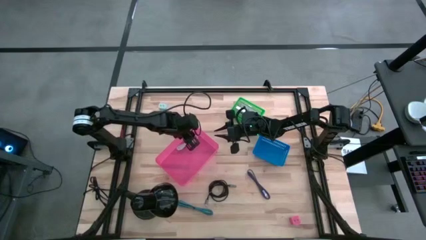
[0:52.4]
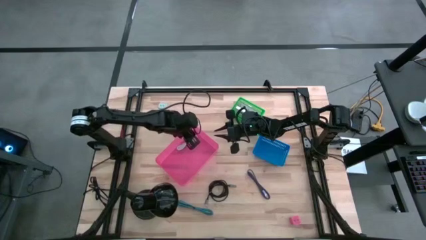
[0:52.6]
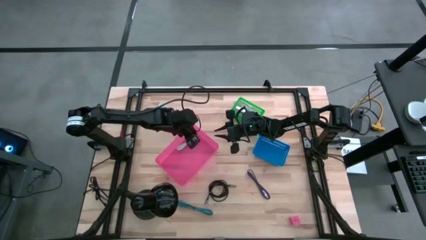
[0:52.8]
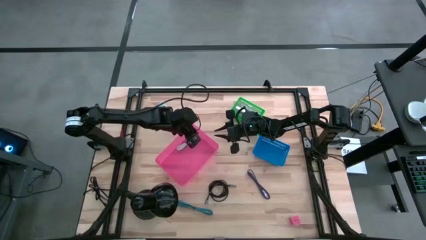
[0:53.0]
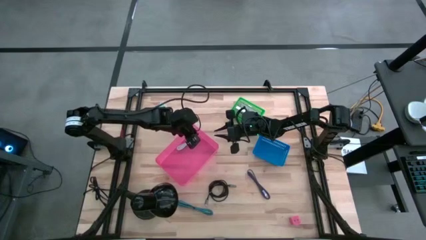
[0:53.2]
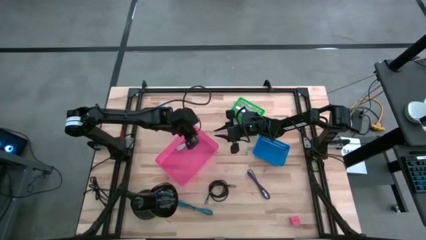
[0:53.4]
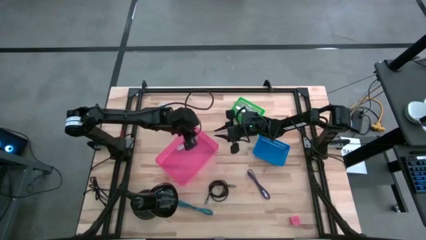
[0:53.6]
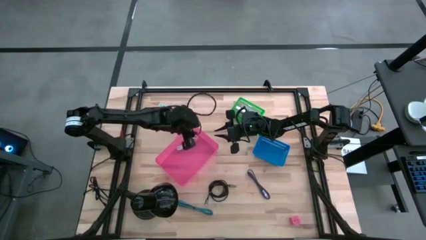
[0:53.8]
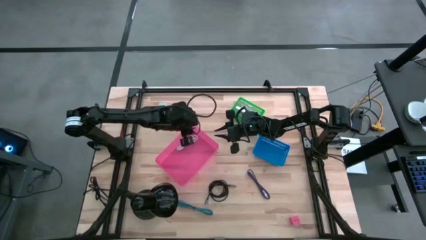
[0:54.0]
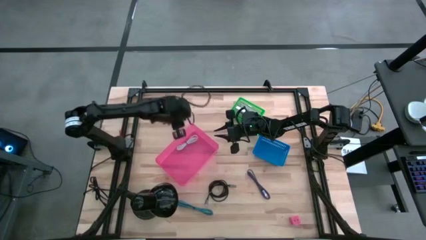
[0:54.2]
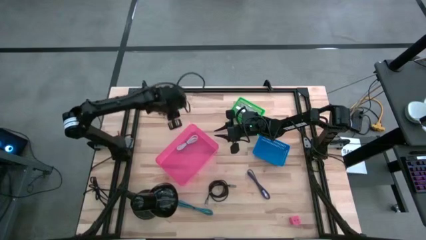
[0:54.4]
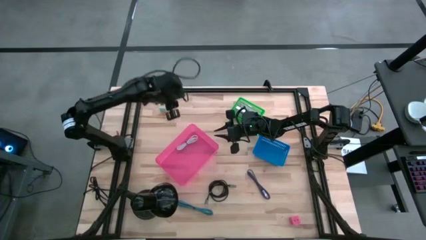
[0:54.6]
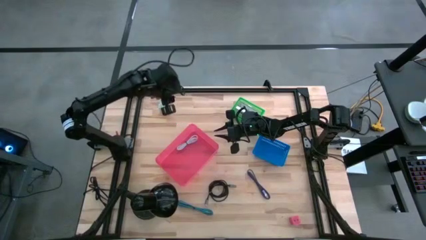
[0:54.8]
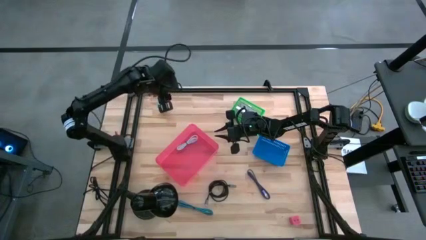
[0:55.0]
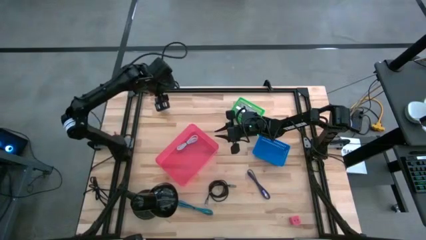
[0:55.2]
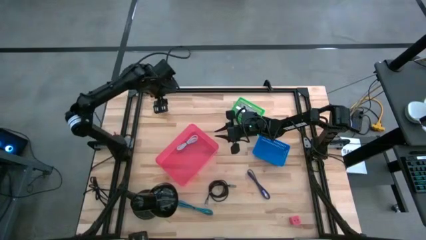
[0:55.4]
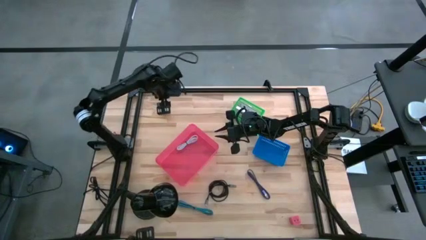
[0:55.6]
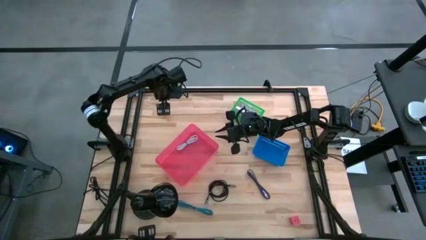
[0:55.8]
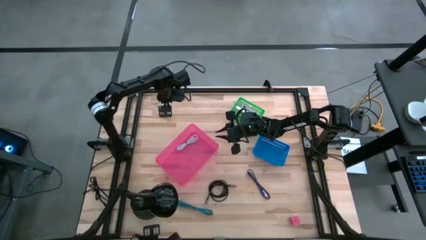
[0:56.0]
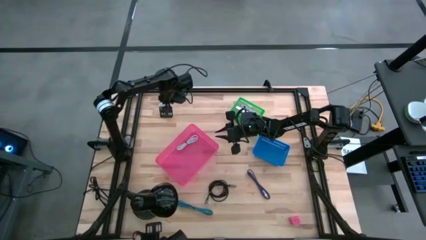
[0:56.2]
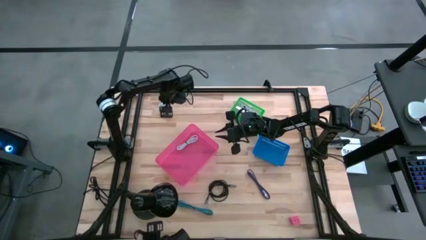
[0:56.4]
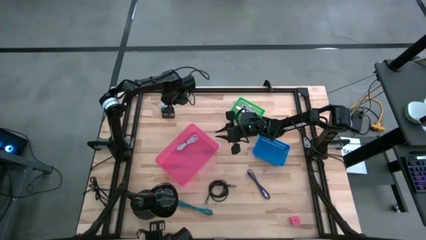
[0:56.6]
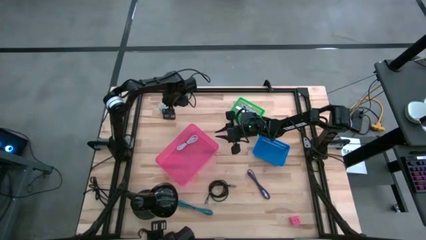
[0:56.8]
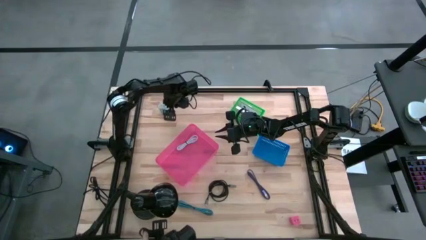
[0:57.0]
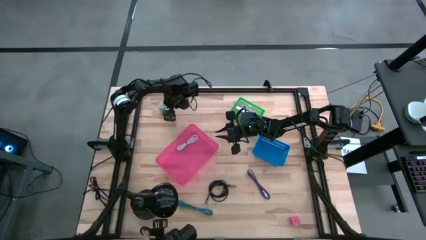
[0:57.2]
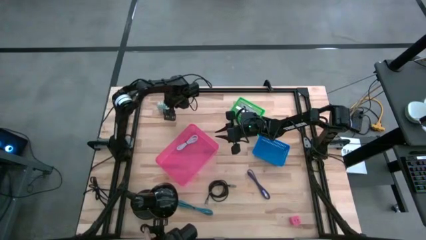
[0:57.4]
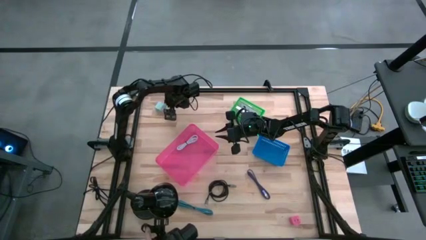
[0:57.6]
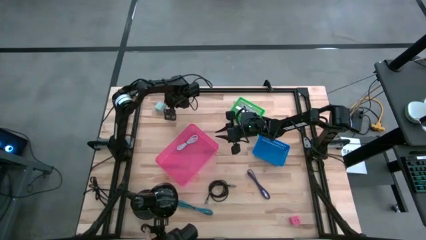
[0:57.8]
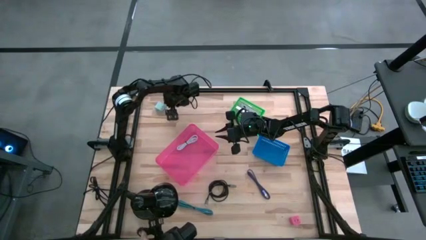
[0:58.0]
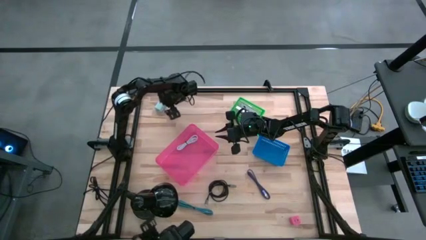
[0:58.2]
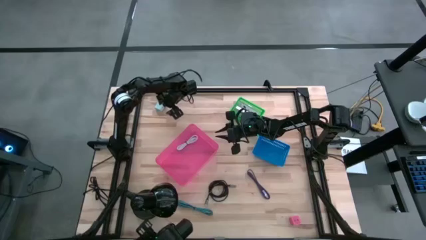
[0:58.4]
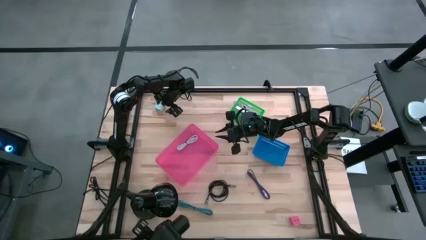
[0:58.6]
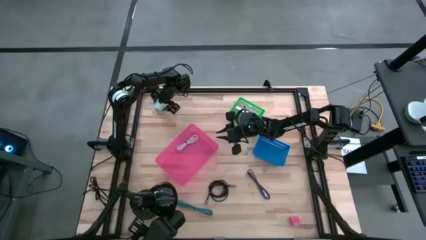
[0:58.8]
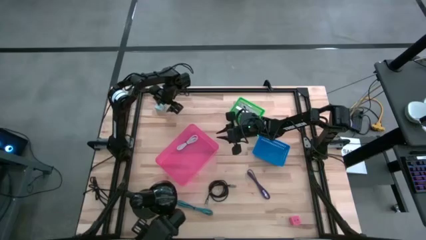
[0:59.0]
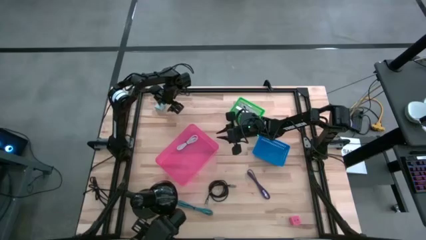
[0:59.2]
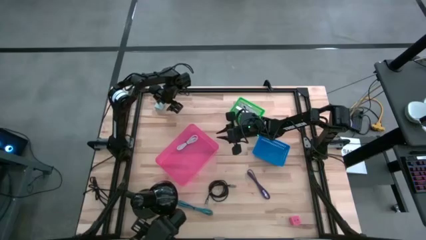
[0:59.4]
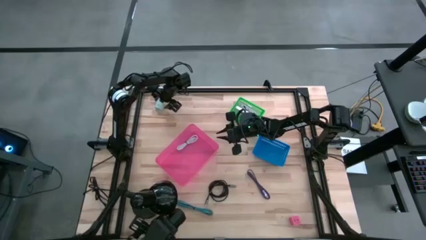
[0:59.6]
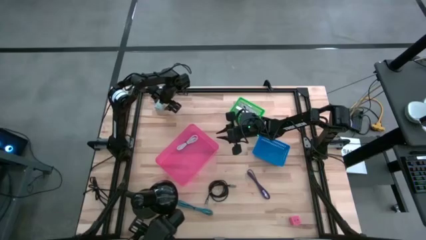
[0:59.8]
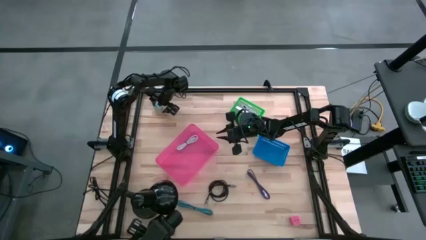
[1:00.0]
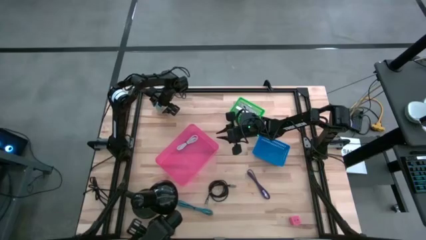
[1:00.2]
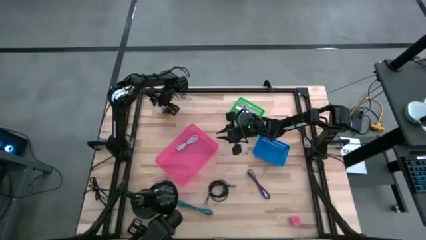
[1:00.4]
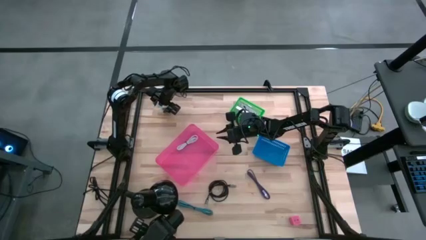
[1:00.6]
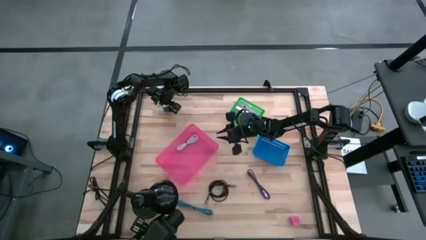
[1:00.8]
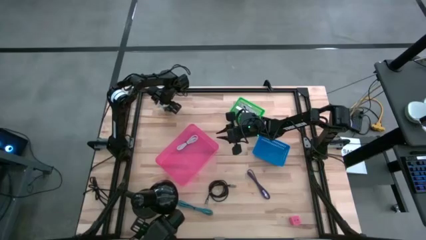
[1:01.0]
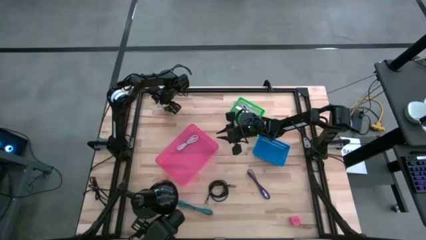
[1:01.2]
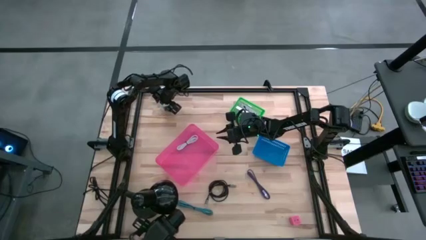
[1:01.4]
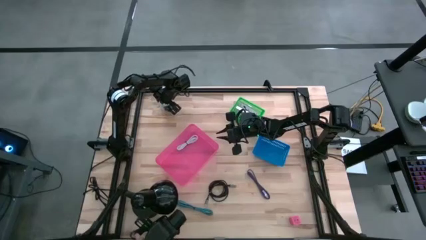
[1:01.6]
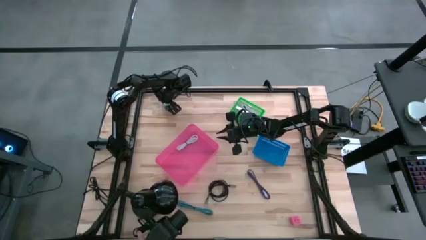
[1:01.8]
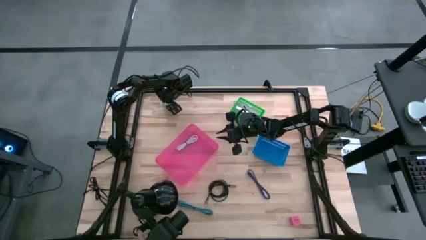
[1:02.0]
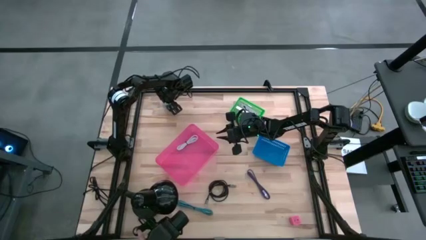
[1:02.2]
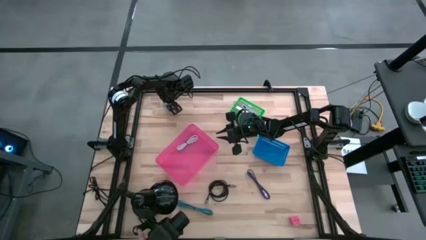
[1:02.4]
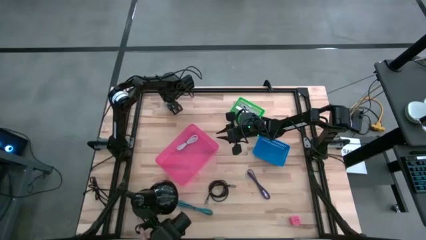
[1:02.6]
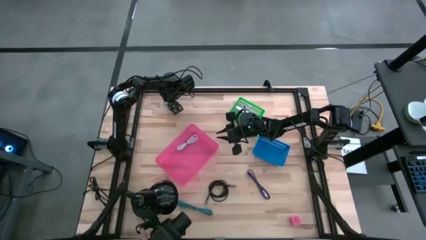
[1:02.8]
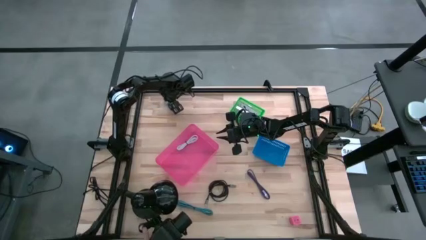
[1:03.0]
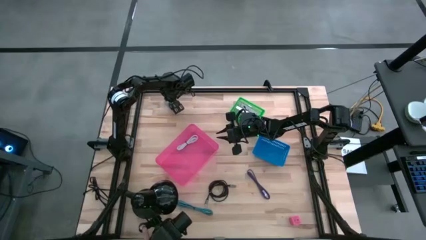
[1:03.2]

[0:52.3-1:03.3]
Task: Pick and place items into bin
Put the top white charger adapter into the blue bin

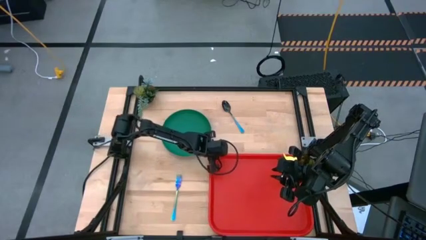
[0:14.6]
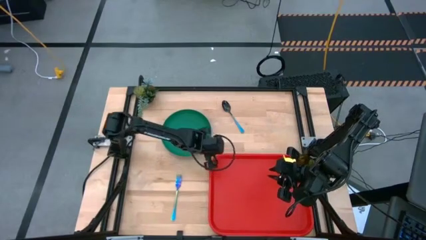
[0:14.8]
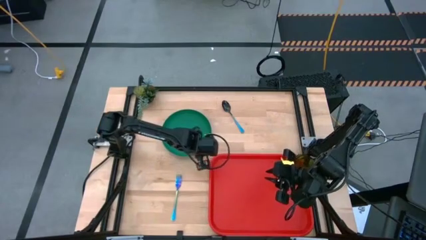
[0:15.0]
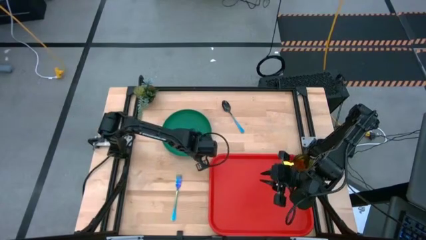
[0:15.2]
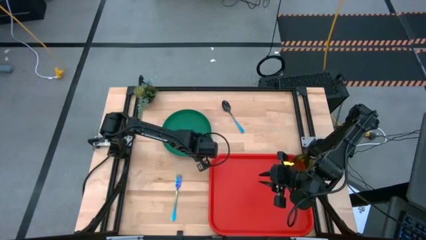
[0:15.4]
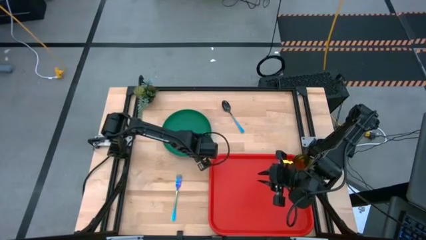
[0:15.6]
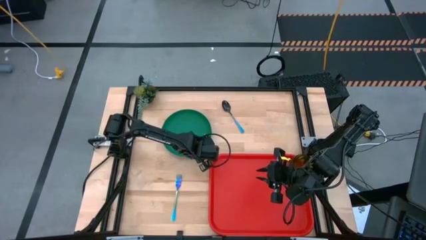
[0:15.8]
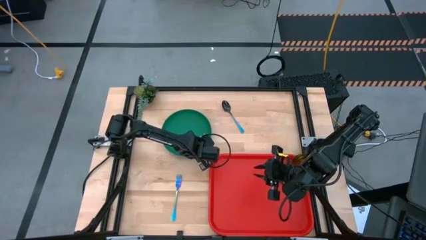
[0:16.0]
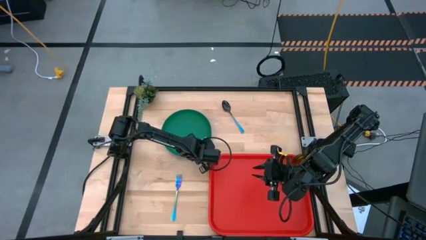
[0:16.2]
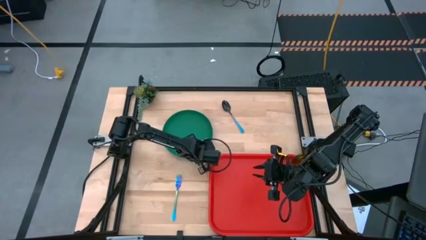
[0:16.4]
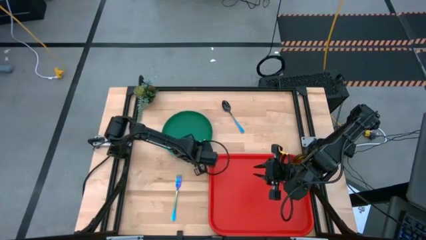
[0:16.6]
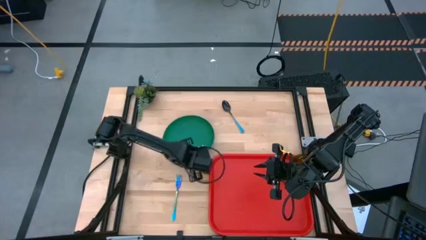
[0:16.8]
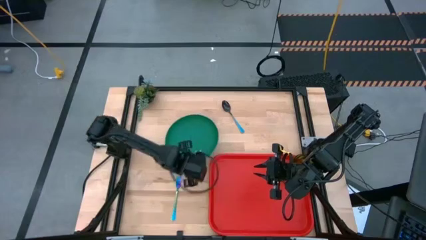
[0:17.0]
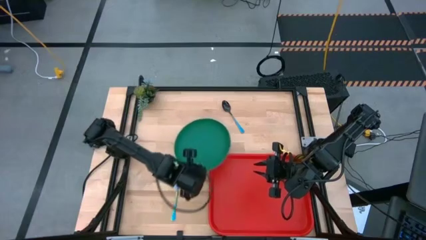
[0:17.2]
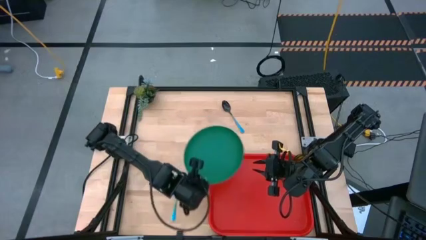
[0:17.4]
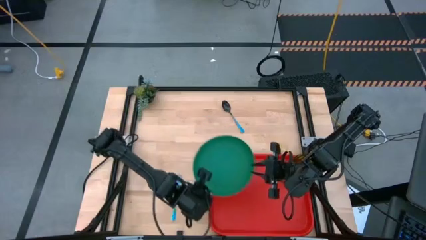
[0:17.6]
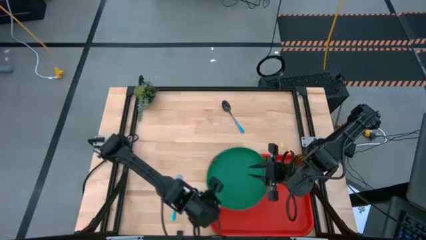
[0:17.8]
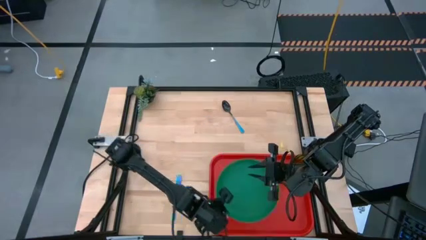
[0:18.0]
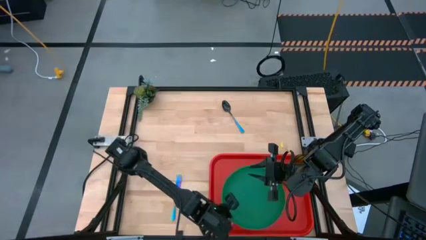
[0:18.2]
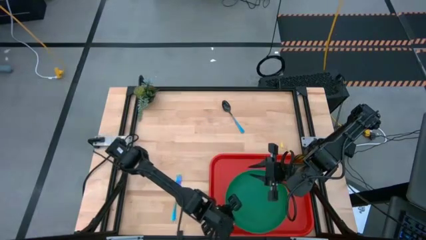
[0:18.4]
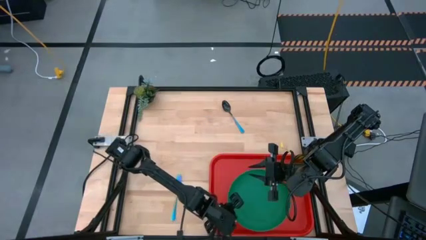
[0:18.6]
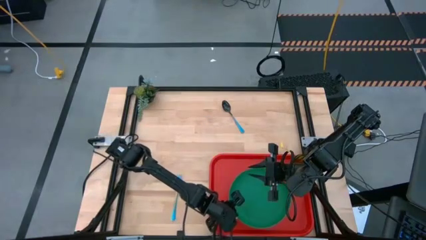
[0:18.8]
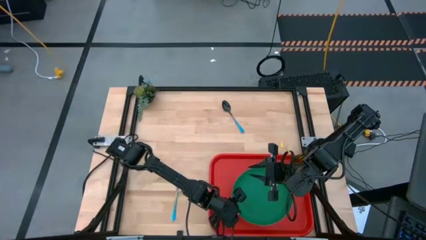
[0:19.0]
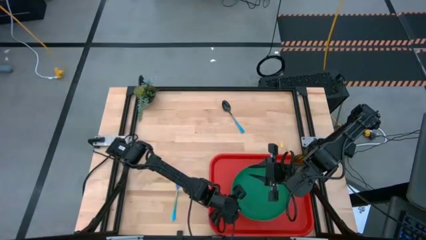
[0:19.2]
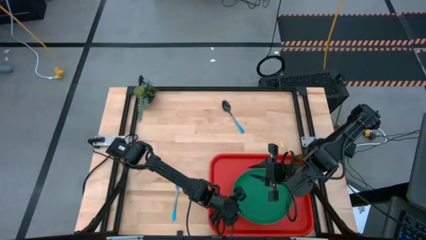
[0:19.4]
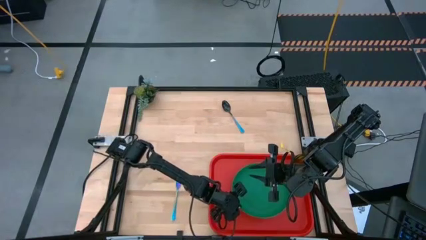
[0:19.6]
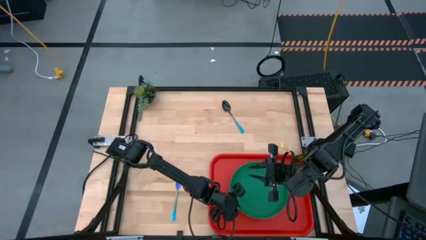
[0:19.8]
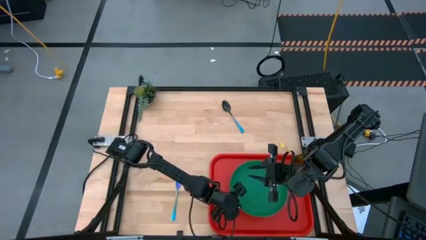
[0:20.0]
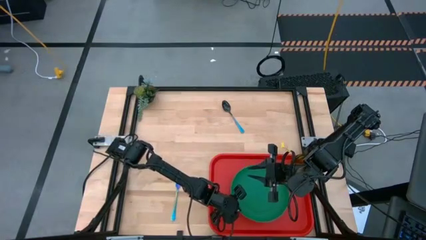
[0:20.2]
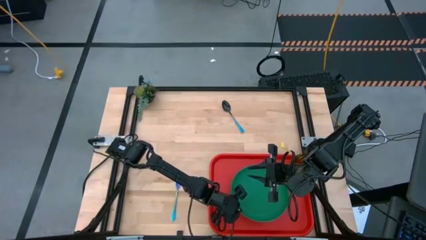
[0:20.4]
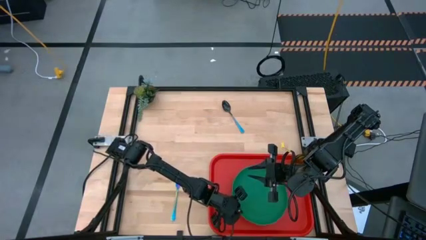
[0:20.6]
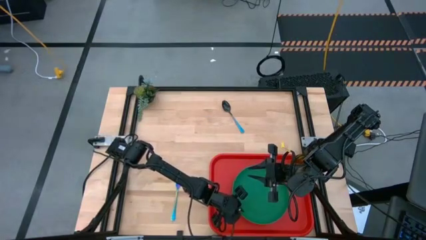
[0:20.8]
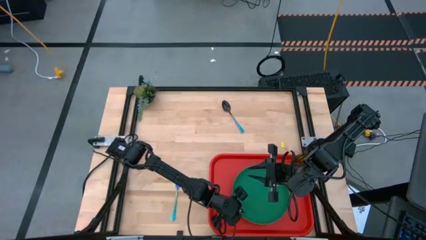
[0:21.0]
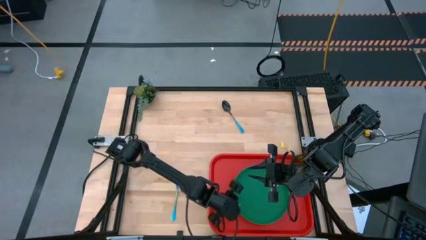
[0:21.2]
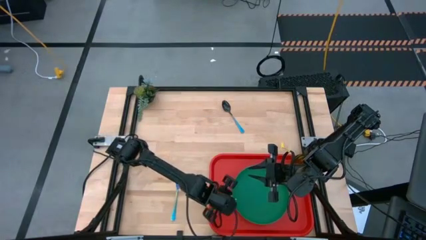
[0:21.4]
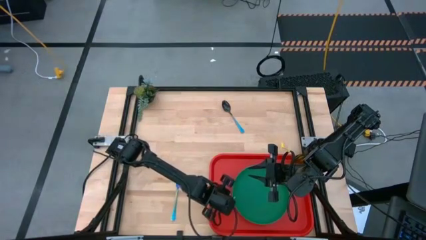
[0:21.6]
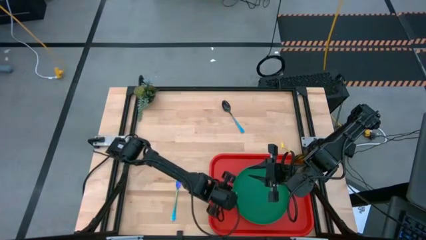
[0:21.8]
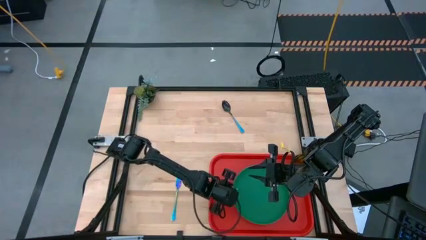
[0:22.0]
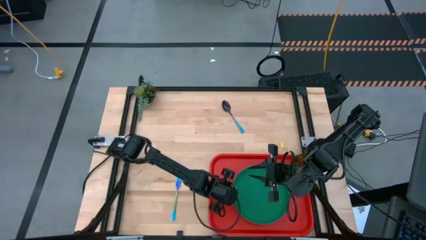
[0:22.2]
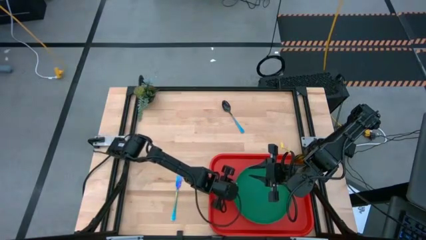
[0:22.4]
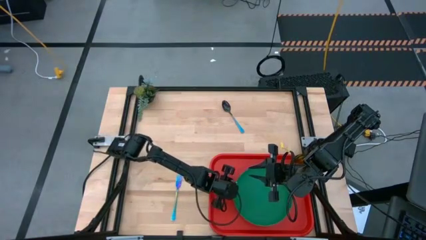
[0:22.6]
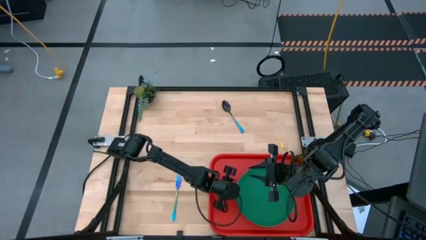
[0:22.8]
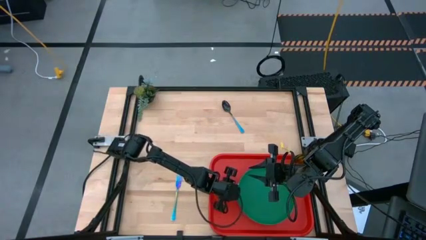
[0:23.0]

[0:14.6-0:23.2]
Task: Pick and place plate/cup/fork/spoon on tray
Put the green plate on the red tray to the bottom left of the green cup
